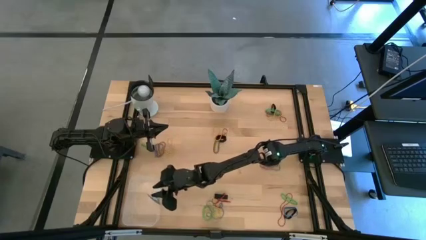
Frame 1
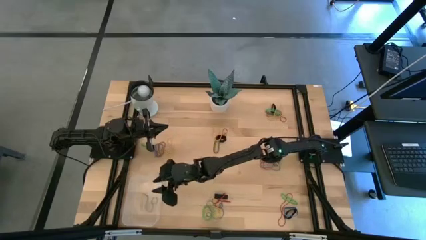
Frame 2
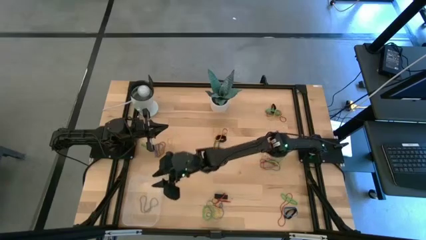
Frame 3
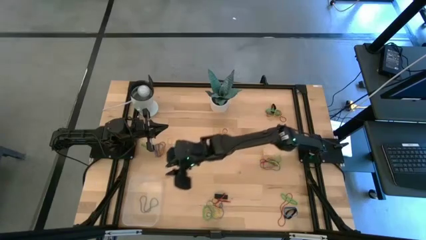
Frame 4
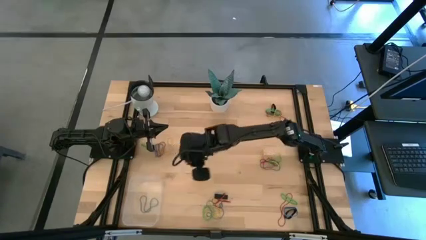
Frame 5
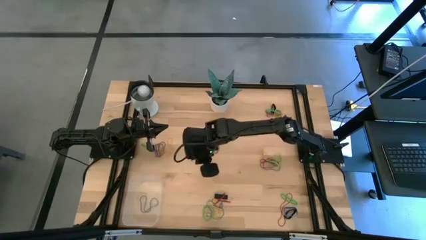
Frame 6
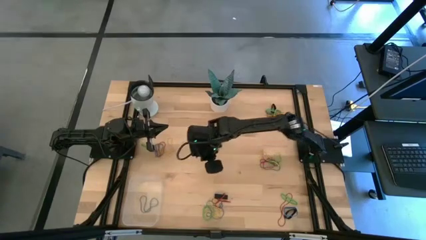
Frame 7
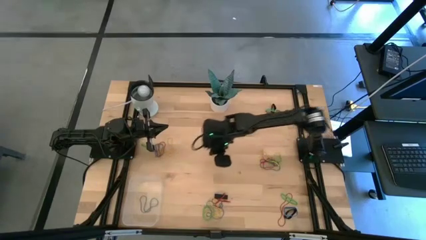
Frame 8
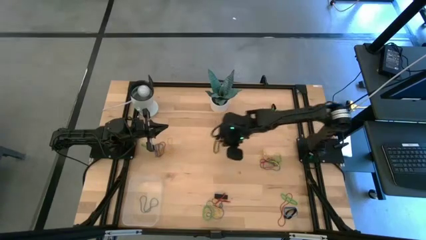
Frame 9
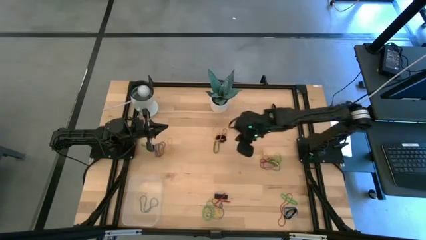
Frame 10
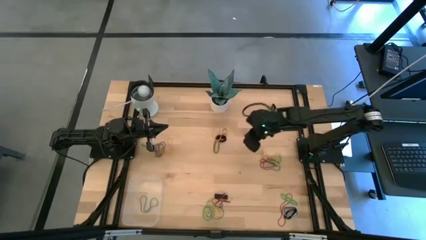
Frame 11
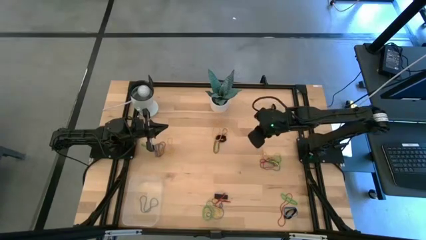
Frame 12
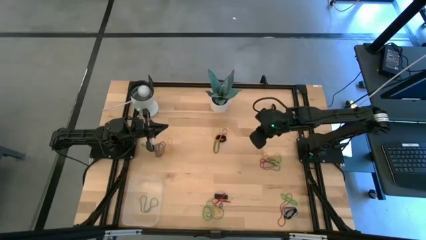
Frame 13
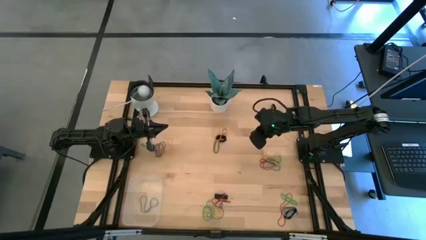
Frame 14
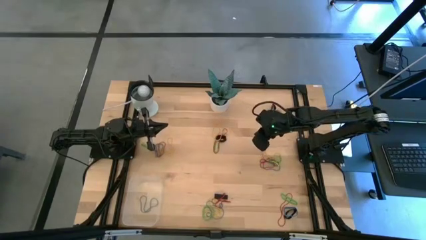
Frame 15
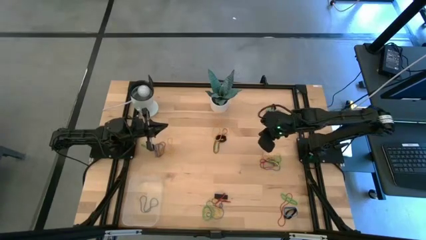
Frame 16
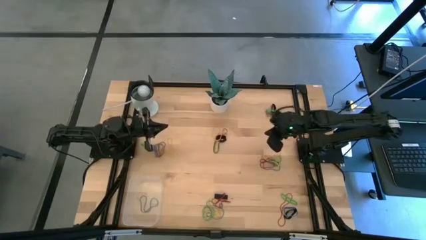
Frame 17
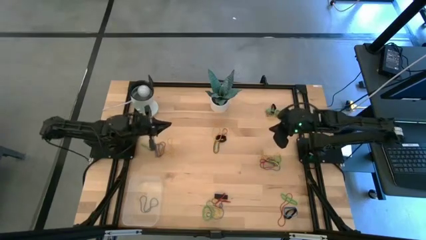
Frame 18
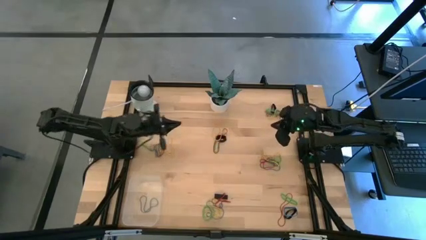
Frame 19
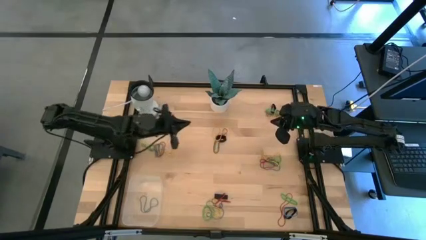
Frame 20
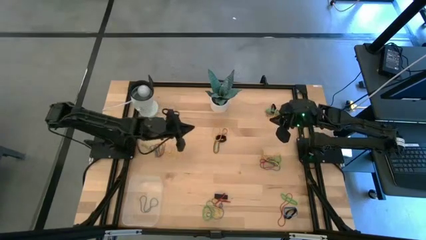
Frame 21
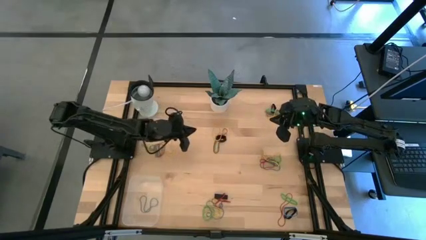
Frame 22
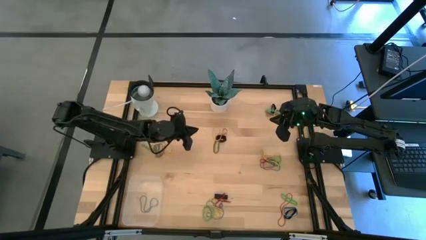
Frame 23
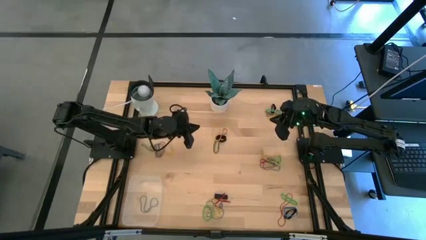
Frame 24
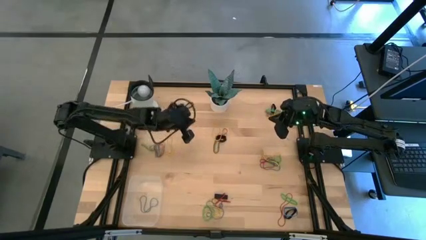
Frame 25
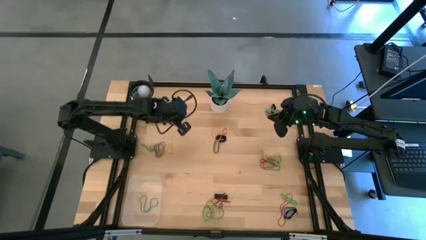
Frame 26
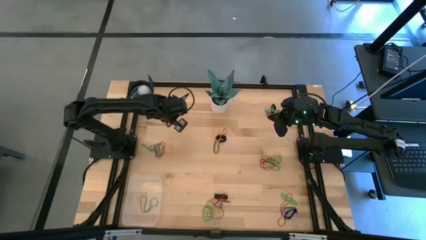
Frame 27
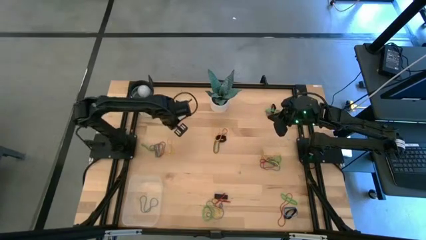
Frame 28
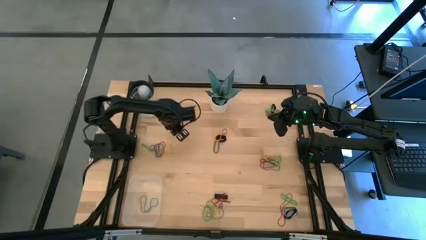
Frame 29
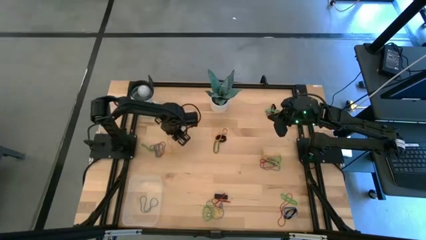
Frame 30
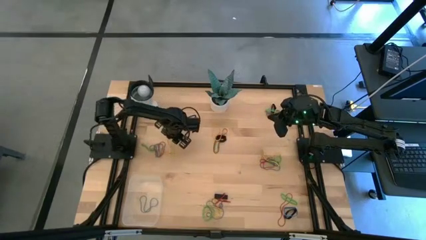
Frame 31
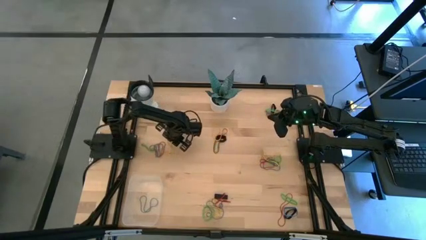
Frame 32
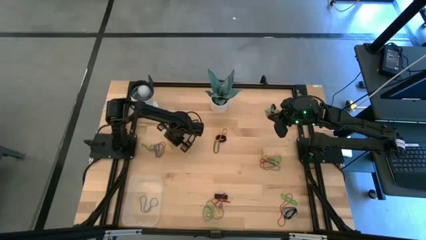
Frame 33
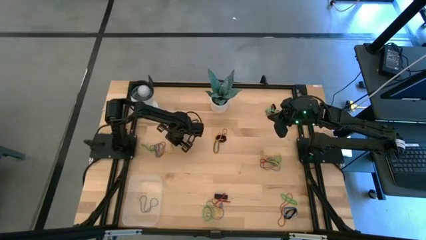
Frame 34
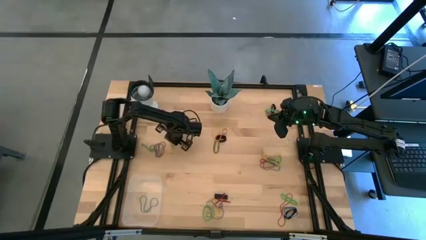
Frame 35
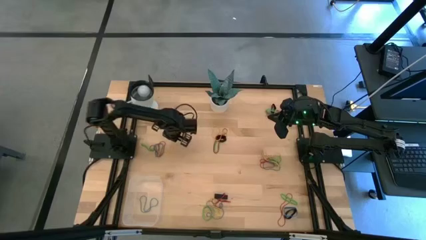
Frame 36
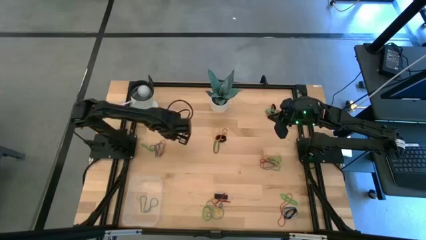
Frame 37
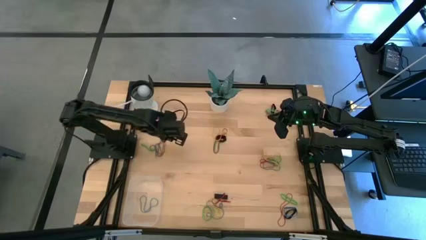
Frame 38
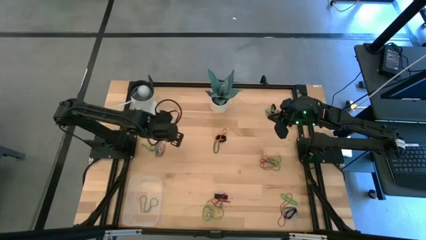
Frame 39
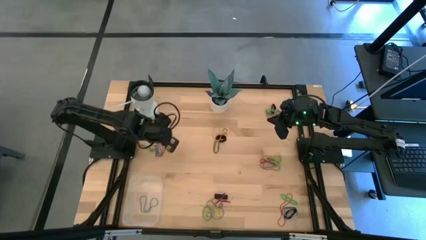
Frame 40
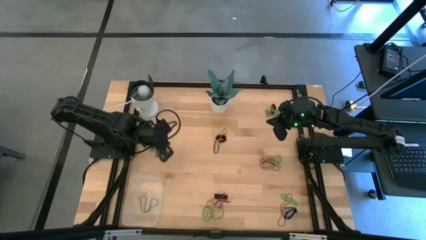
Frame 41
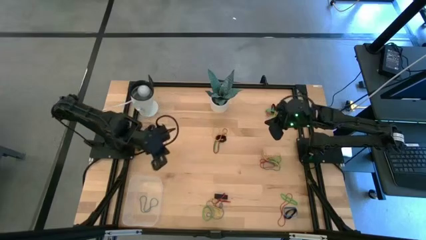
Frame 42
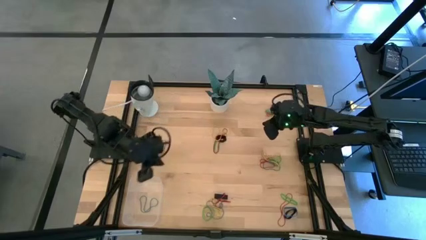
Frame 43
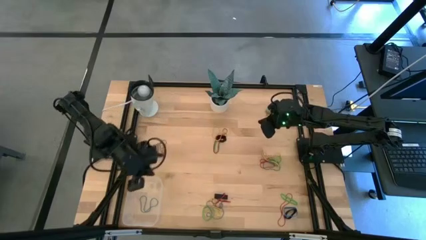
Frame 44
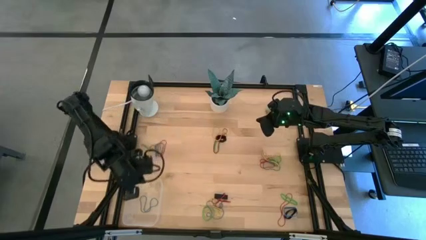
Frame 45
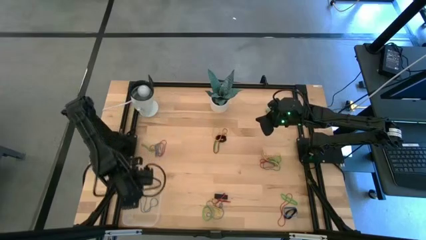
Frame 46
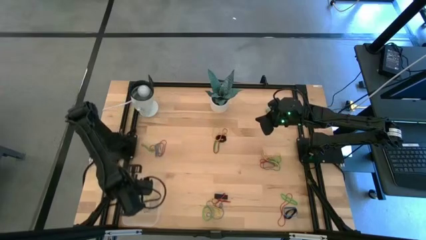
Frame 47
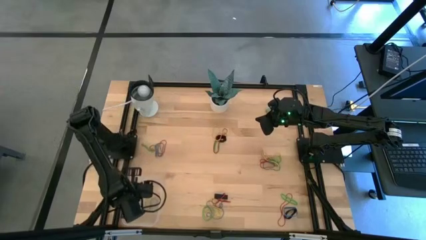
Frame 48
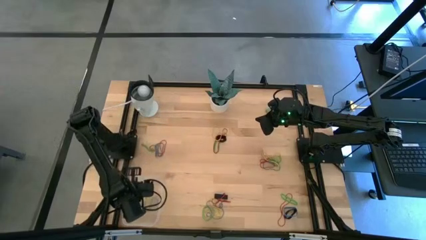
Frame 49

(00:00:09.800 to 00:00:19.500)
Task: Pick and place rubber bands into bin
Put the yellow rubber band into the transparent bin

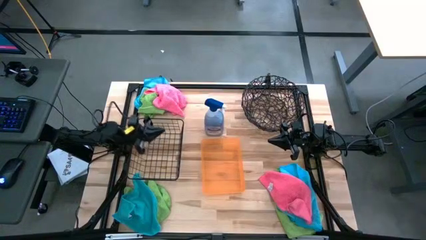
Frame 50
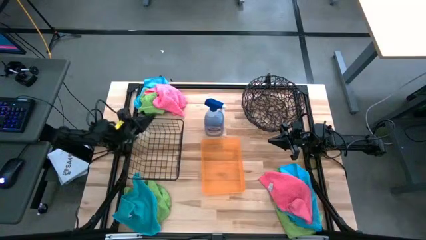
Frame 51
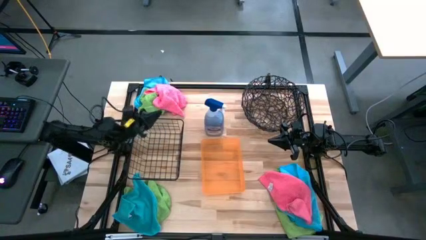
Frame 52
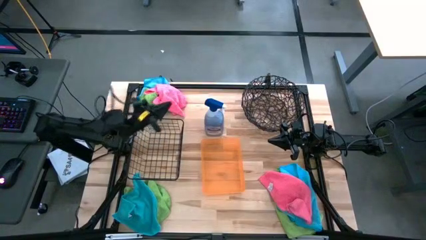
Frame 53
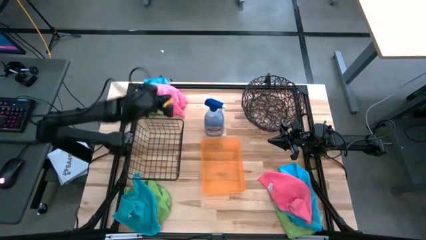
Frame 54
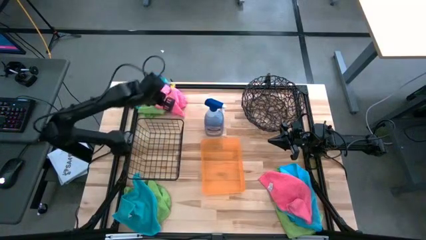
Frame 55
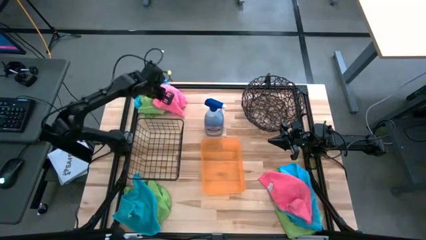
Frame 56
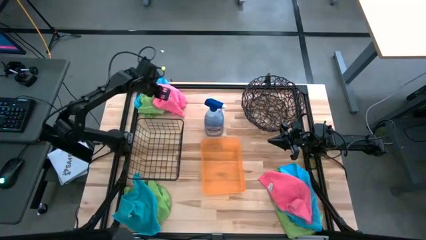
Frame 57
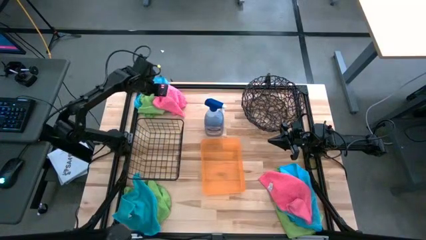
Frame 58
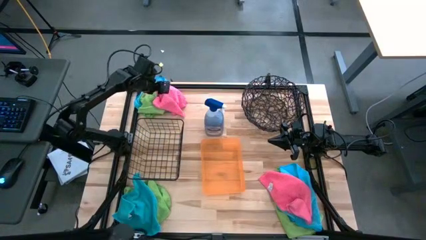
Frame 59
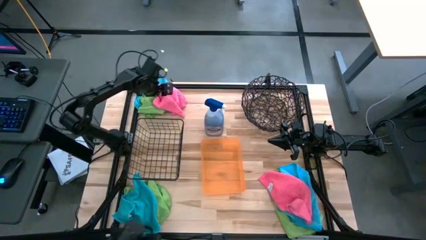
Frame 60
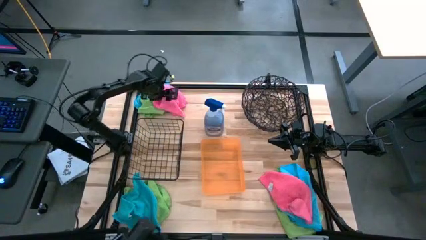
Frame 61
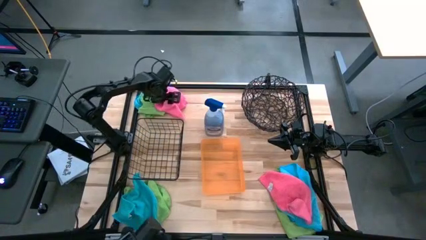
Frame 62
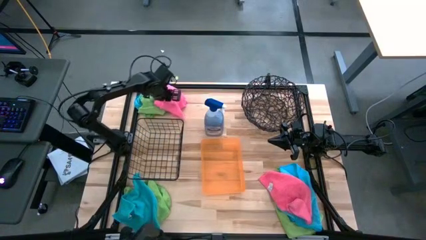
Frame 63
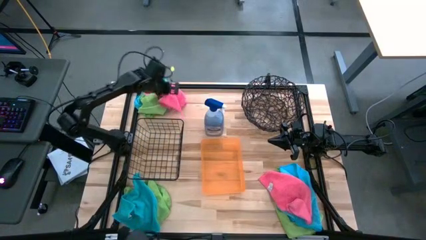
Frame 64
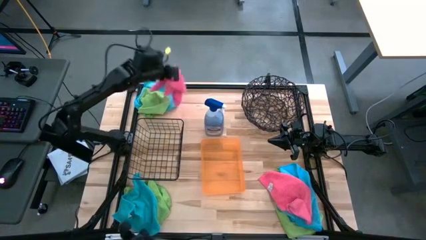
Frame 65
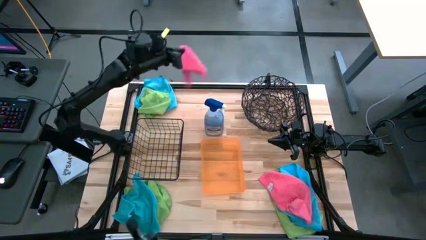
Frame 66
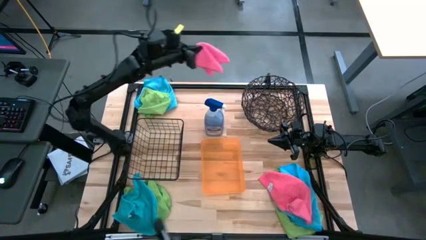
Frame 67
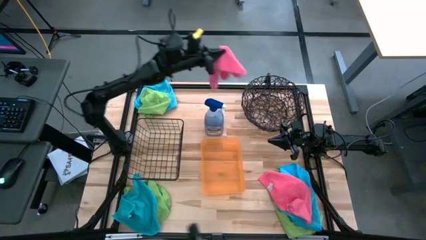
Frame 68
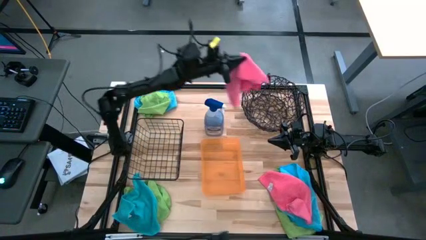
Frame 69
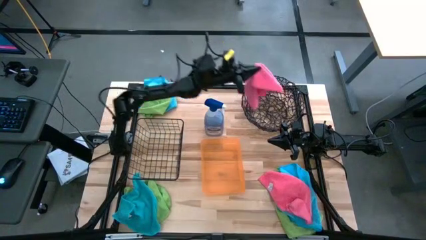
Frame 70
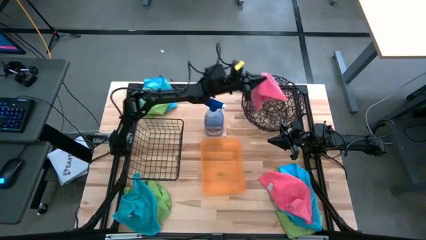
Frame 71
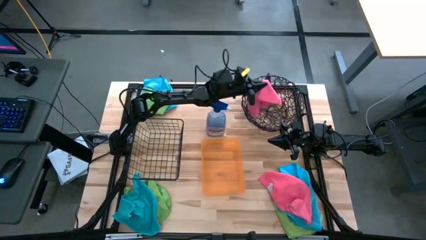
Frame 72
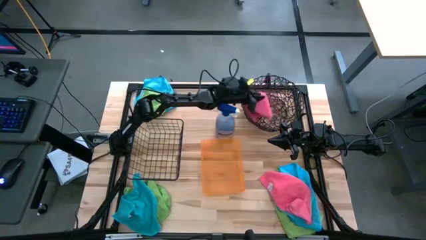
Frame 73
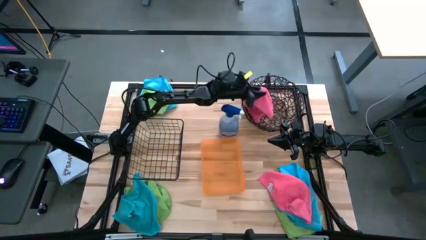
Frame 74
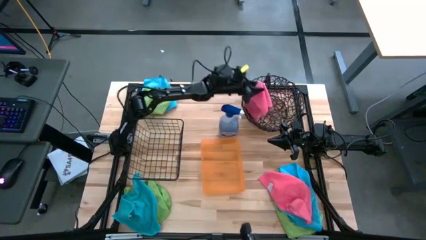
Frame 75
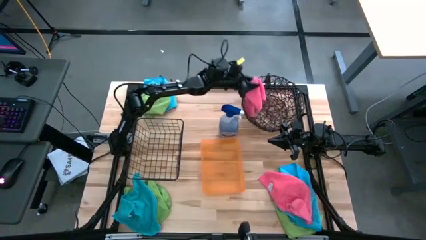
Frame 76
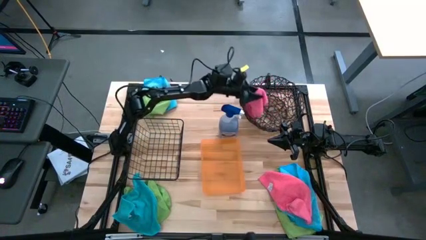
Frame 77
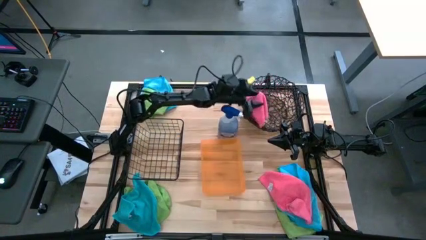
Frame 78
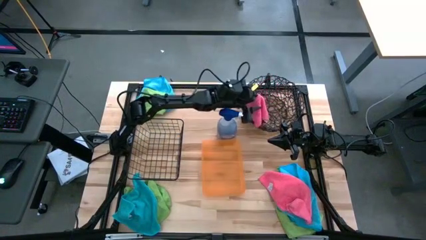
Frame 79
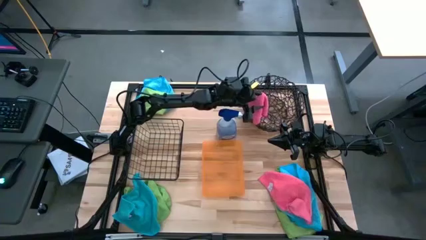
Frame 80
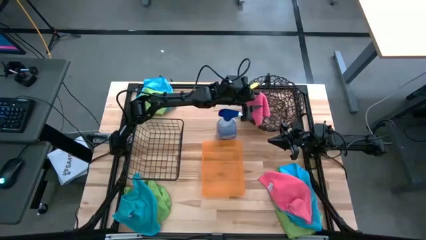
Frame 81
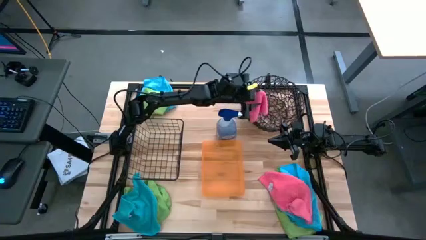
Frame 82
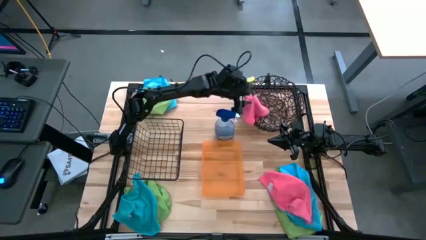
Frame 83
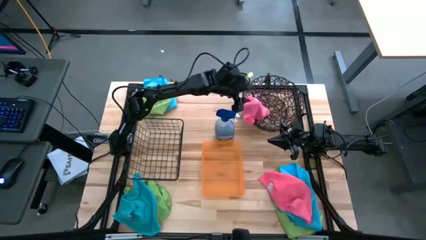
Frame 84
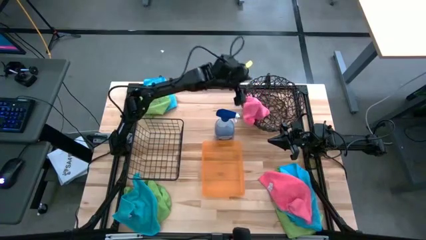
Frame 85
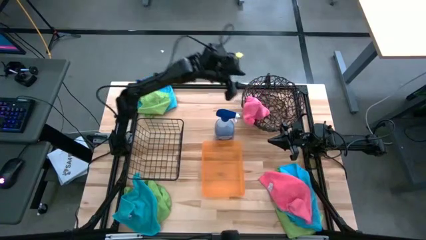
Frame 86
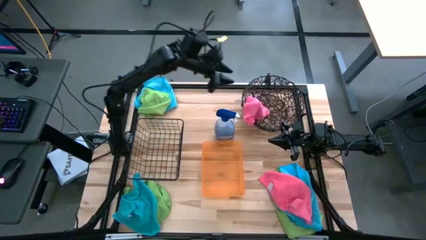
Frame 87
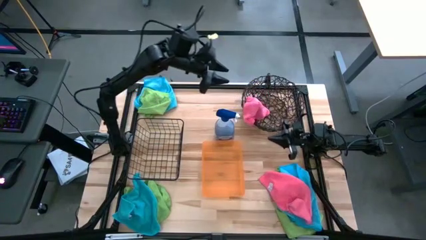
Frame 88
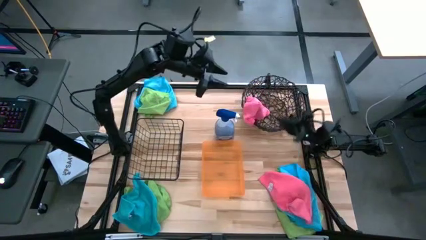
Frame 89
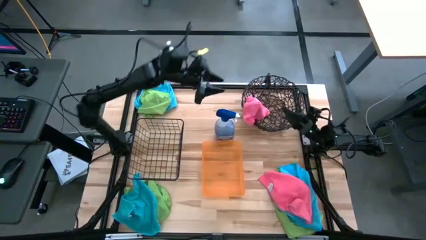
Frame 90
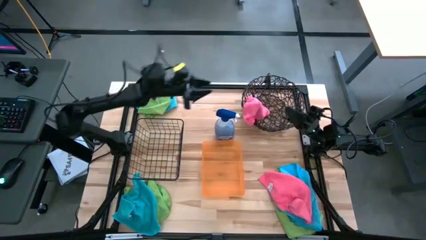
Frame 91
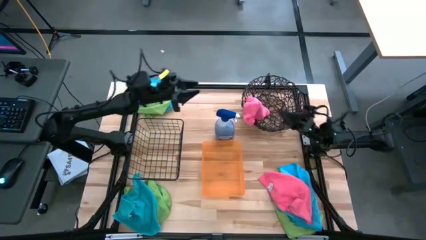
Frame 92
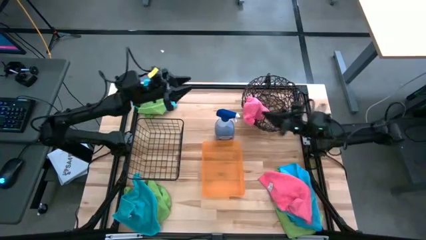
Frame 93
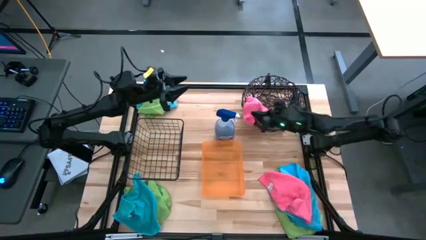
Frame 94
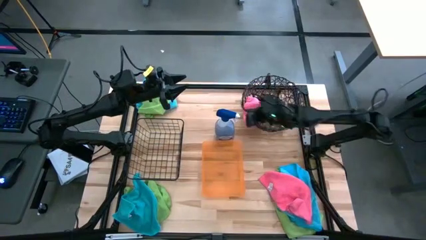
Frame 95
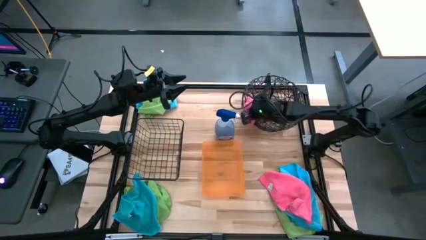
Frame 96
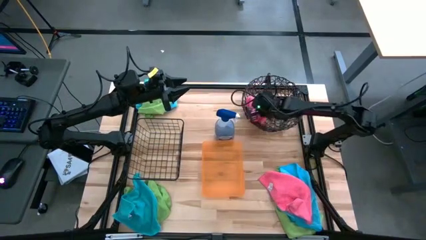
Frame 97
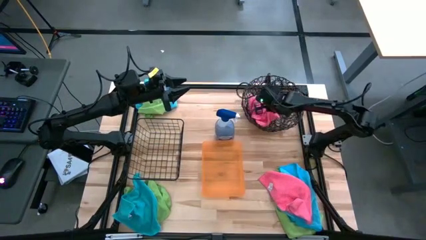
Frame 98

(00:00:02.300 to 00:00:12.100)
Task: Sort microfiber towel by color & place in baskets
Put the top pink microfiber cloth into the mesh basket
